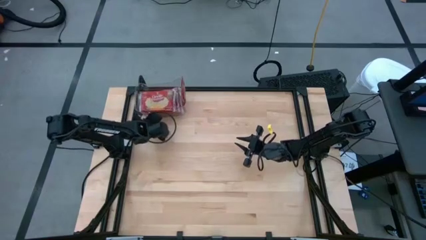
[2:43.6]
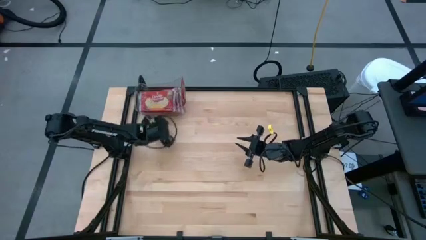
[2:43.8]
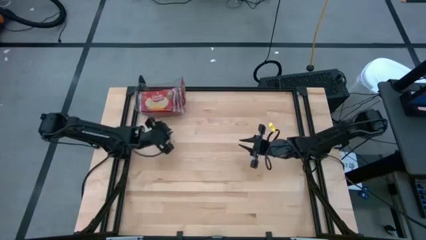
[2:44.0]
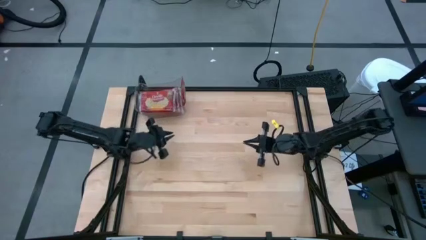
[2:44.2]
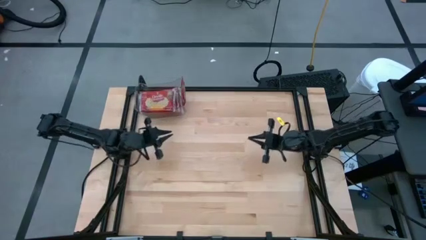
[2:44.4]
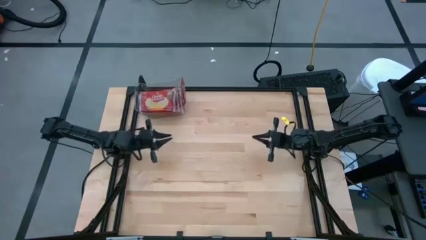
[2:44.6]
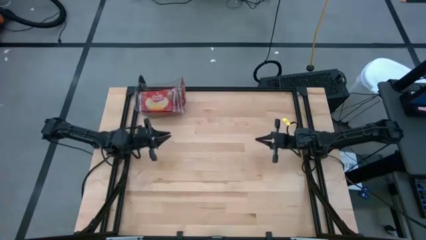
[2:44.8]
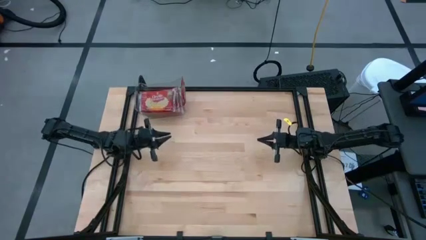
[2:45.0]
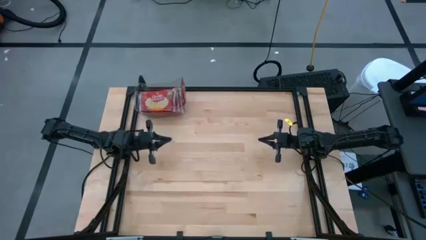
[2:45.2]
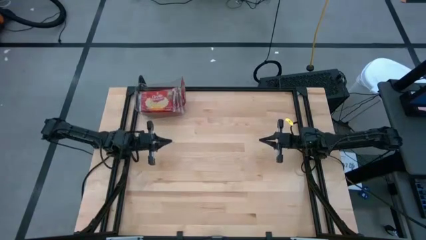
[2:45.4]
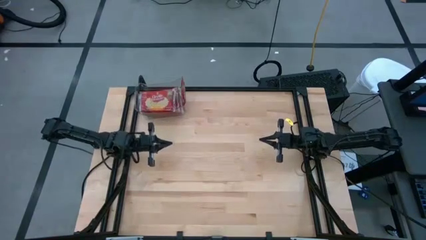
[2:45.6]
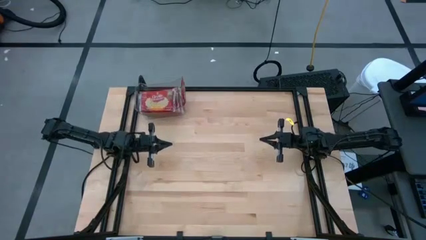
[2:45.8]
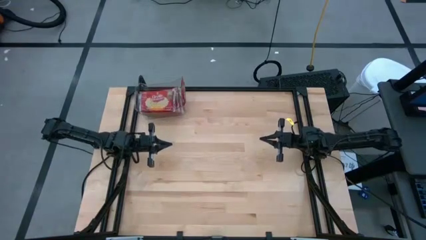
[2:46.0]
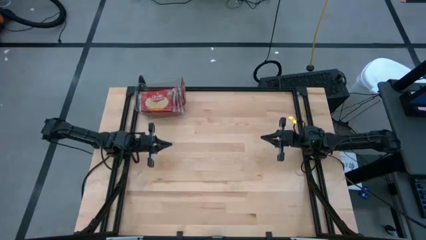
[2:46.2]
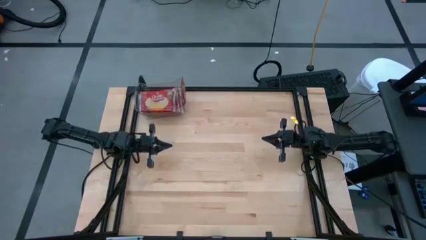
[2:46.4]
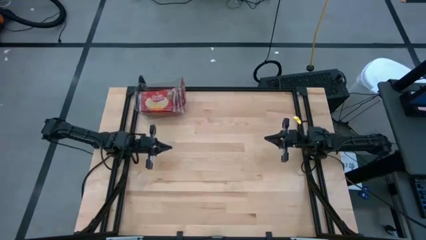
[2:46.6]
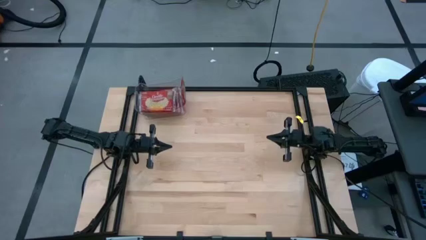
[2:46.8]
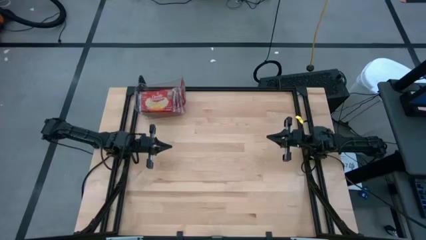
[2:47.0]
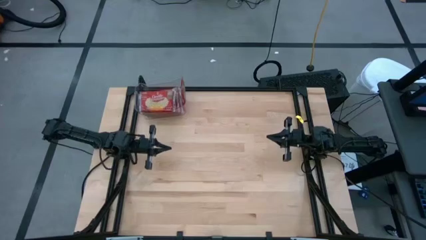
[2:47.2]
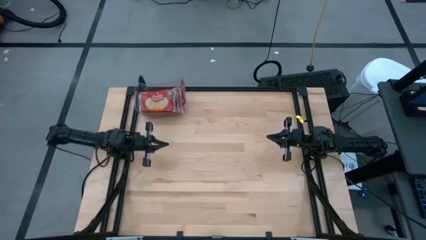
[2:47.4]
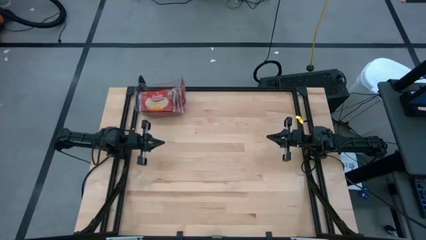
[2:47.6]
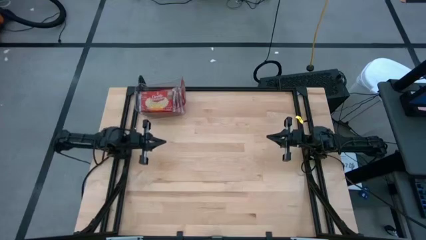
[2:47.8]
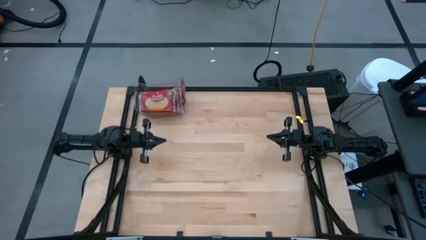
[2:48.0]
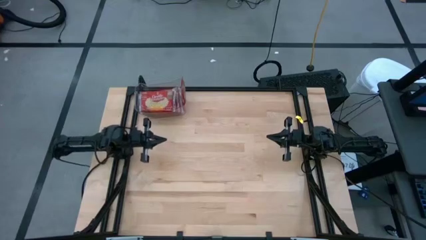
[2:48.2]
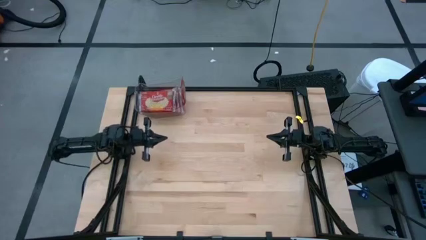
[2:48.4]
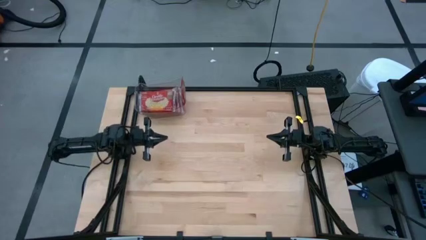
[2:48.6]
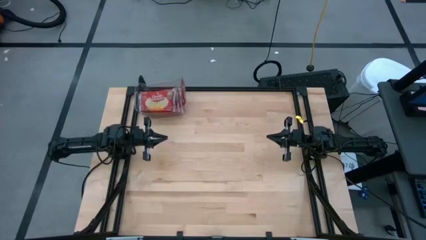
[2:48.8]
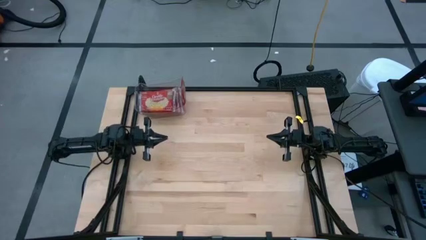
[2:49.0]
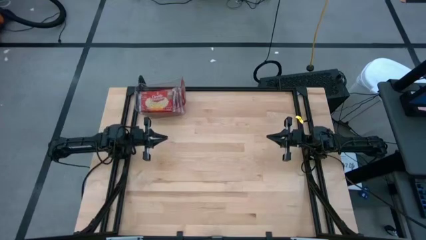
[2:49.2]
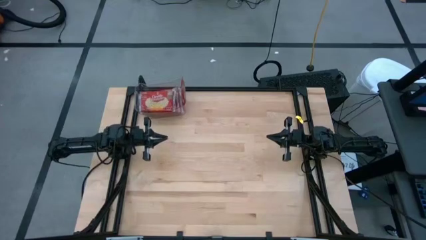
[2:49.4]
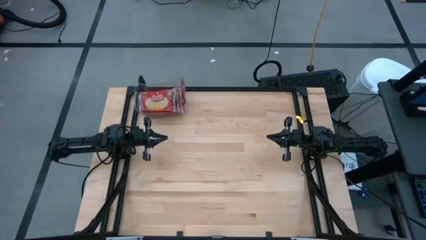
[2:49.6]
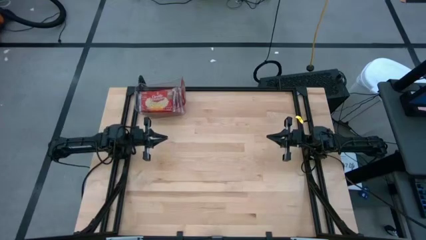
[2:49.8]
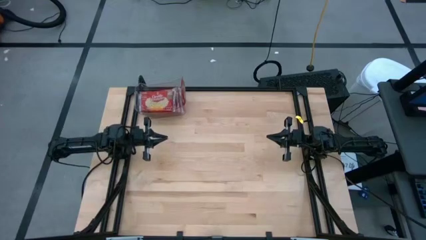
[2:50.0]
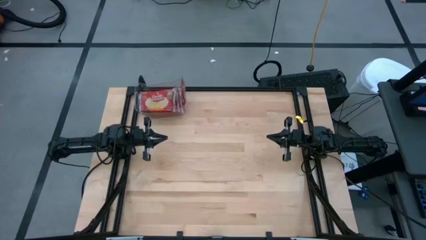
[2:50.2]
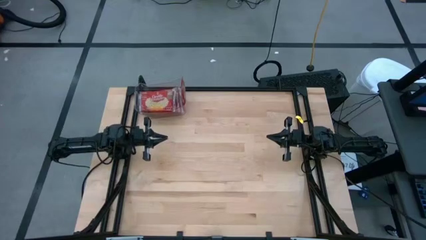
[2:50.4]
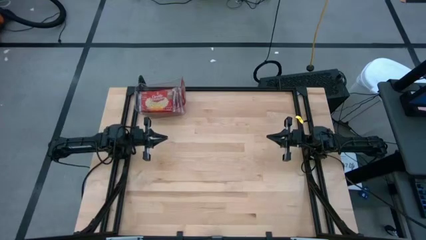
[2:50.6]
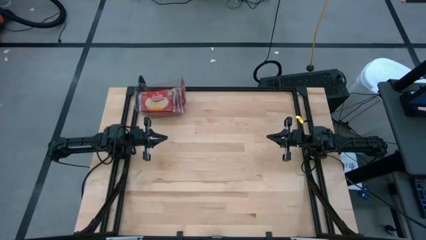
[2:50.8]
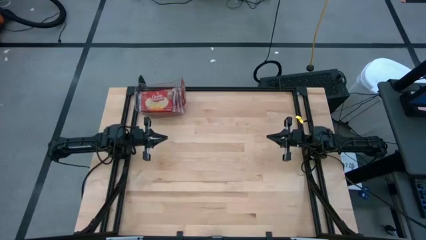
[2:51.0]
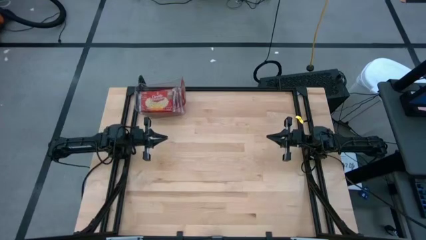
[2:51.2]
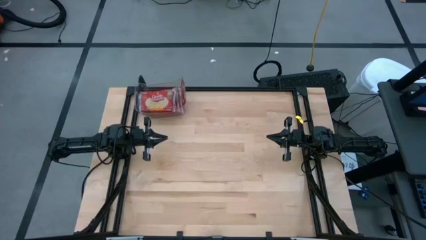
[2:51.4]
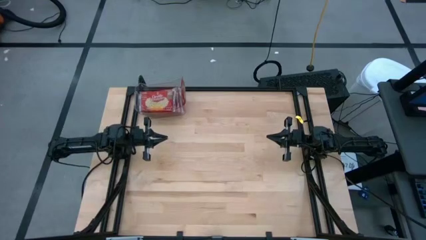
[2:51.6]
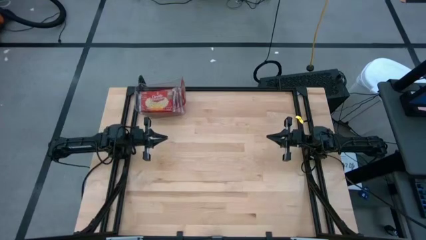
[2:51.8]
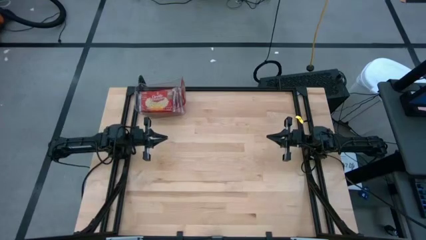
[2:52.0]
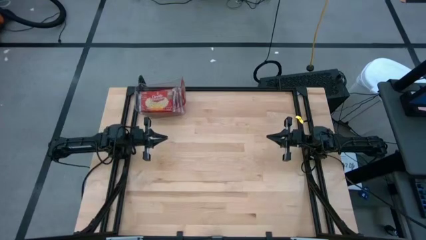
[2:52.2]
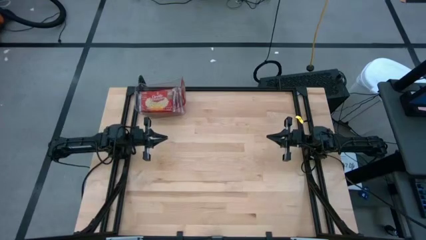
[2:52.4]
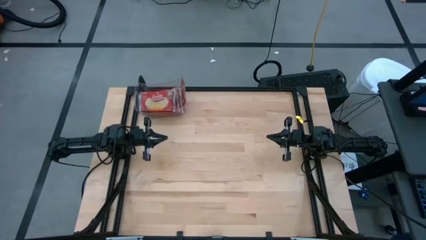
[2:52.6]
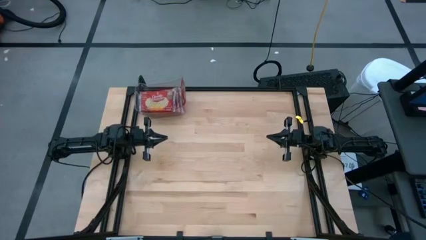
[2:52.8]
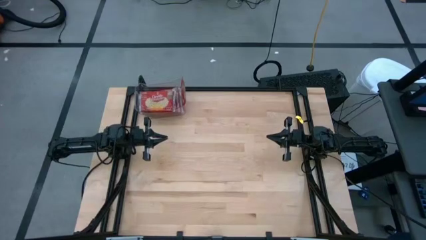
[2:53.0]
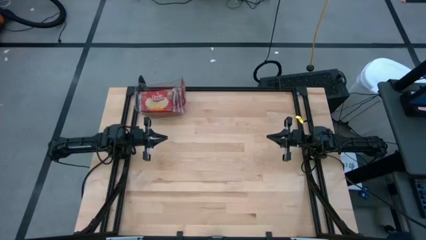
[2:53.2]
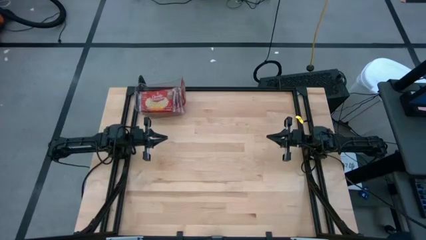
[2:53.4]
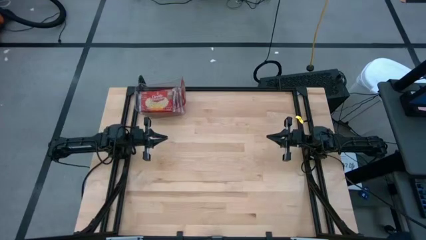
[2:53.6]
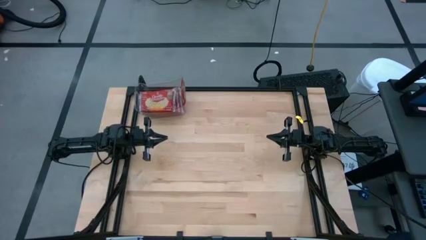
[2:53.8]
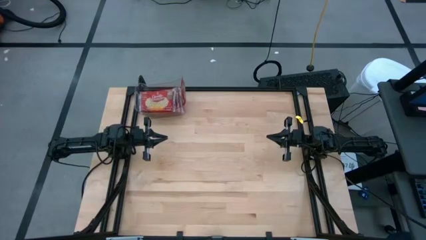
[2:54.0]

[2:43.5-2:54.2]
Task: Sort popcorn bags into baskets
Return to Home Position

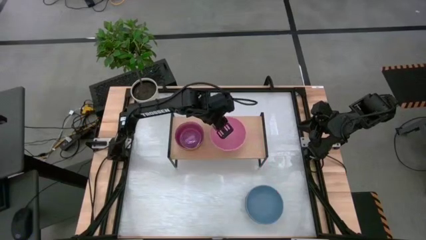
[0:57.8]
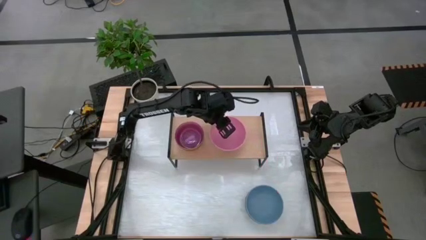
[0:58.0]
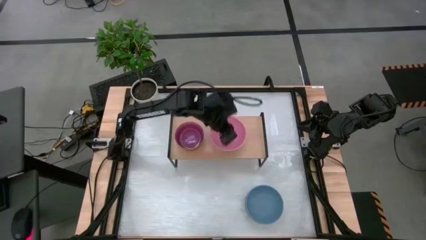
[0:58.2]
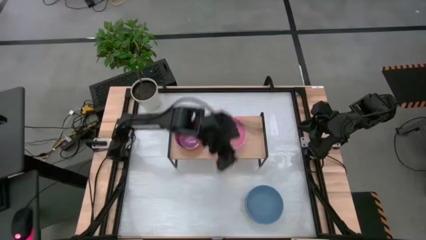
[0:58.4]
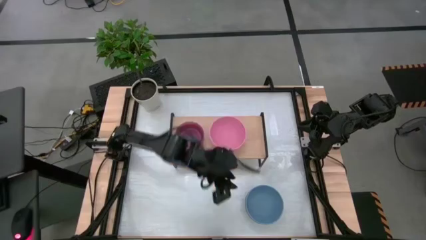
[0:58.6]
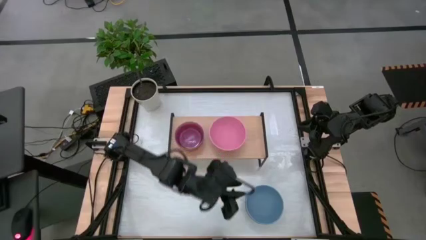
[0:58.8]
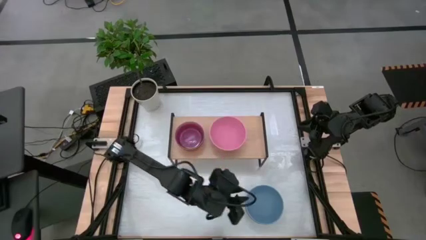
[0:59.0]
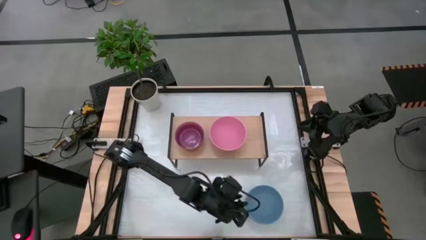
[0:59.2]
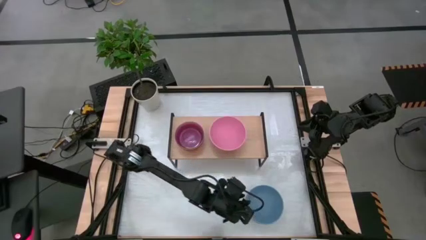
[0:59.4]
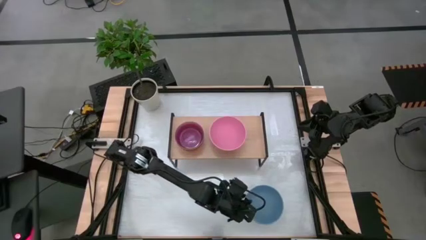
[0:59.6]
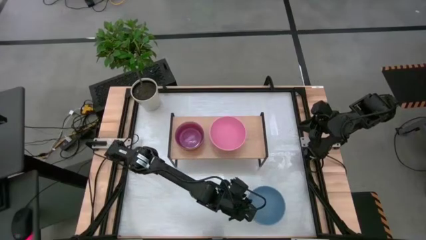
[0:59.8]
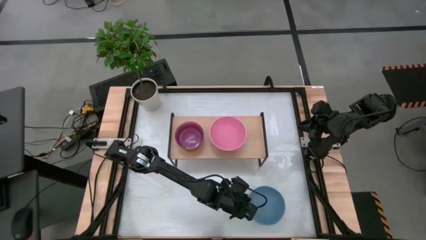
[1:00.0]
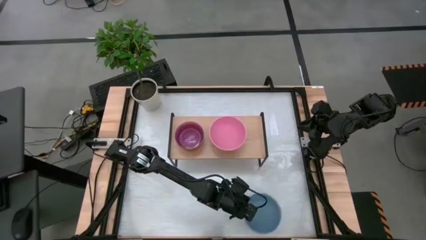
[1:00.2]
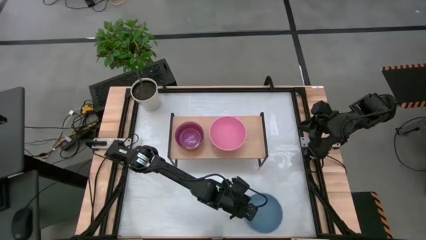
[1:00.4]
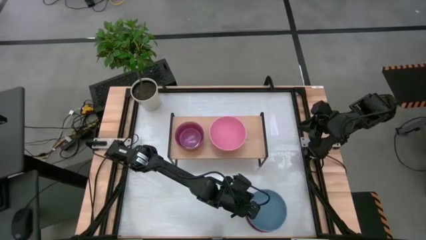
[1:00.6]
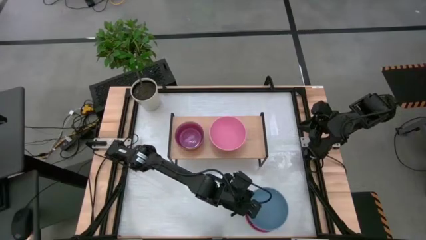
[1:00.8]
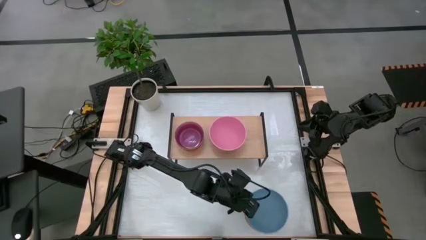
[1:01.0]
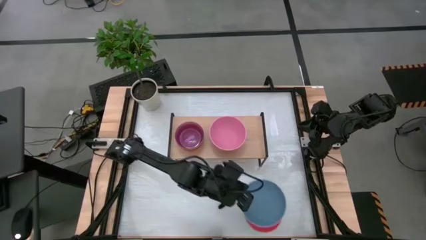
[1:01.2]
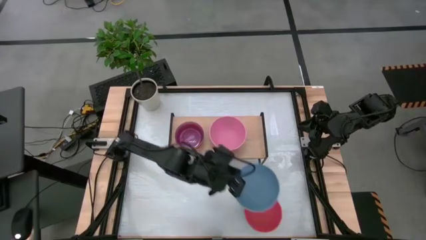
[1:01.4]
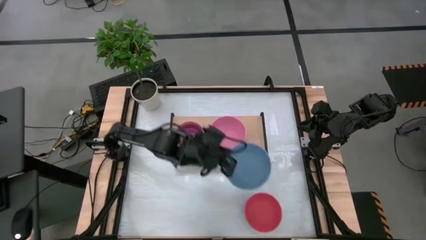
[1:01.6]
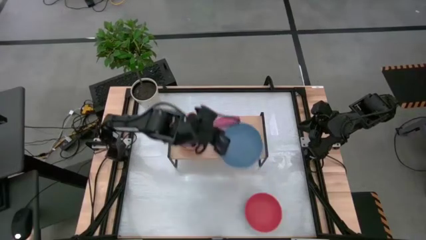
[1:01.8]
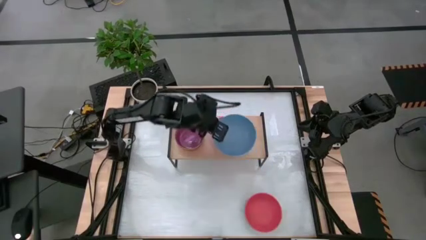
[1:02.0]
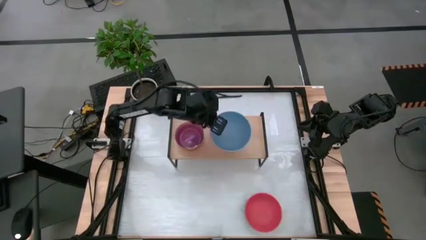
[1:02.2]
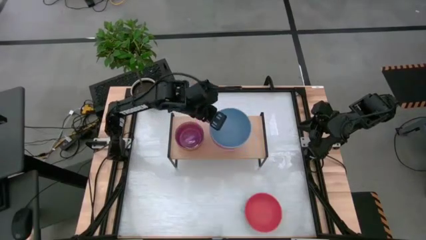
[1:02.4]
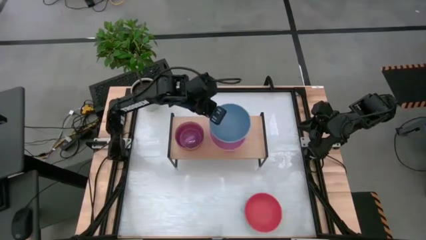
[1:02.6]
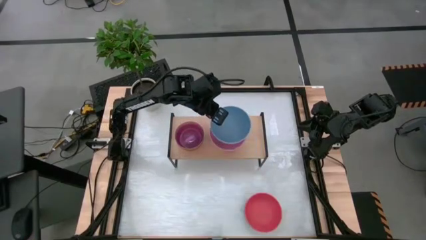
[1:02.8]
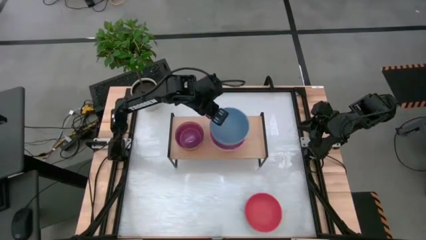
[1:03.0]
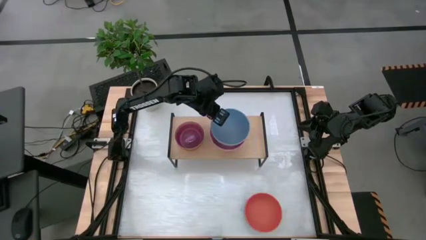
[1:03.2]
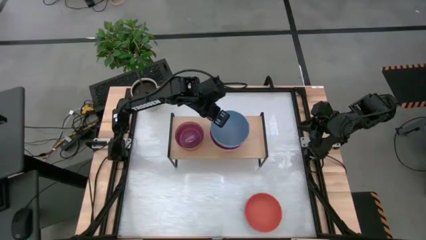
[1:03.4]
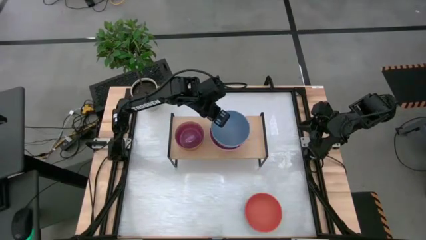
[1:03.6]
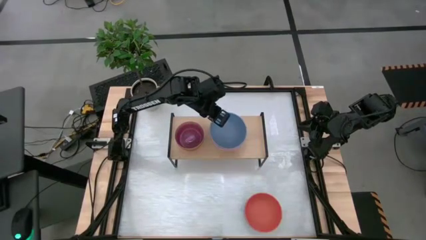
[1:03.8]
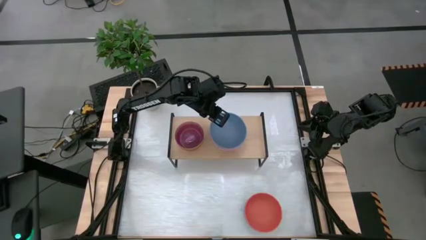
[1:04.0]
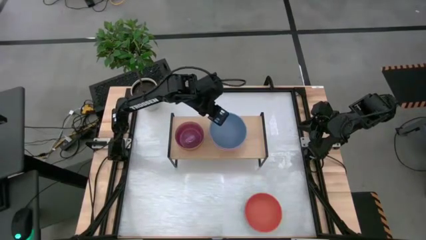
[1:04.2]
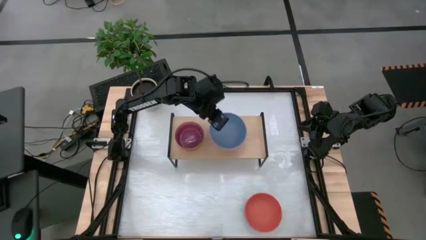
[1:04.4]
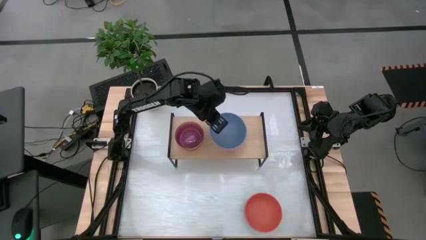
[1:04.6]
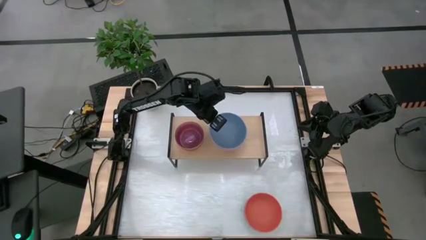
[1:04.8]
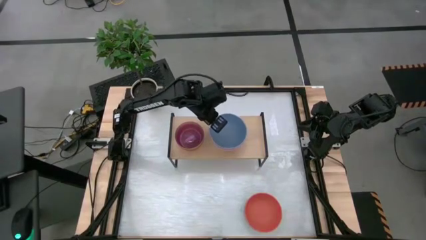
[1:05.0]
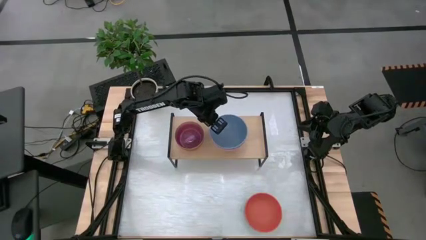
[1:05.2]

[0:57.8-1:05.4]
Task: Place and stack bowls onto a shelf
Stack the large blue bowl on top of the pink bowl on the shelf
